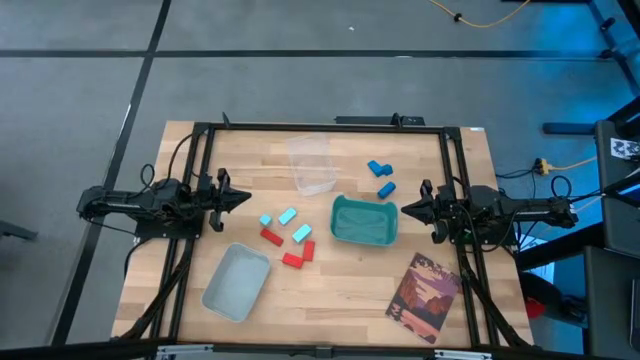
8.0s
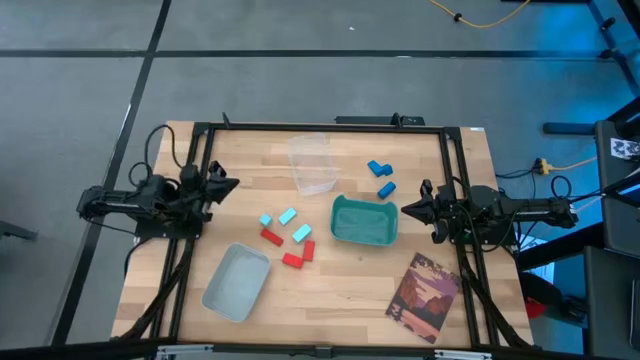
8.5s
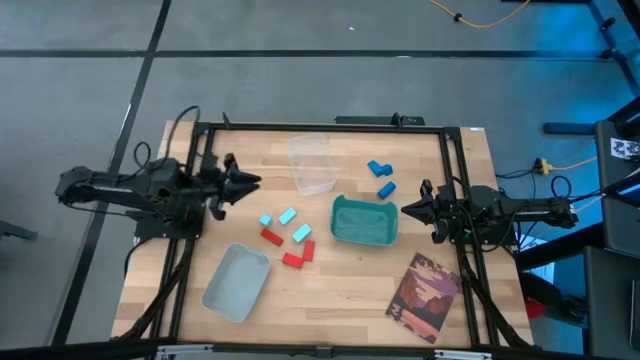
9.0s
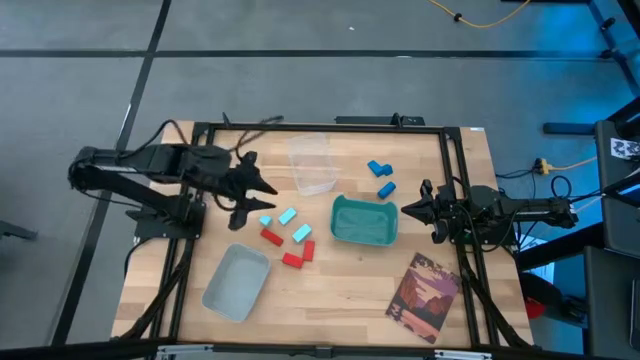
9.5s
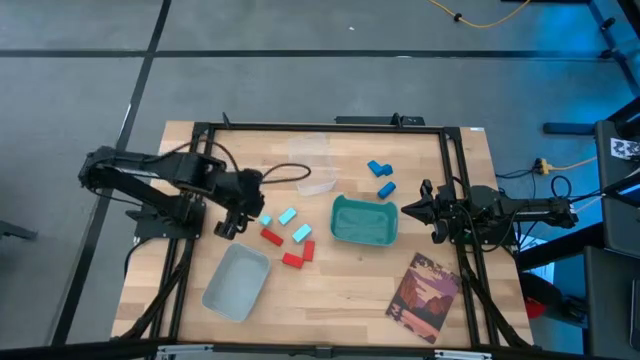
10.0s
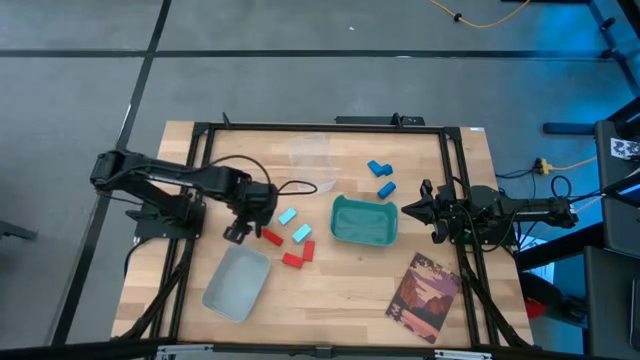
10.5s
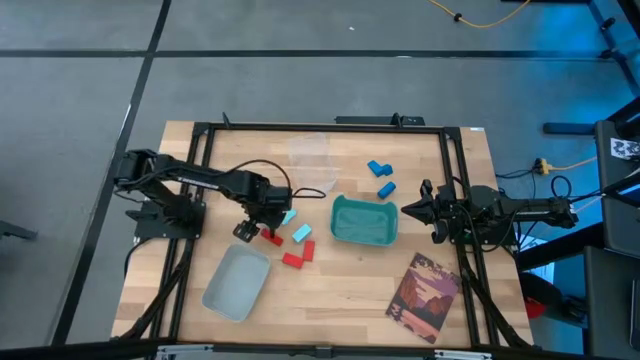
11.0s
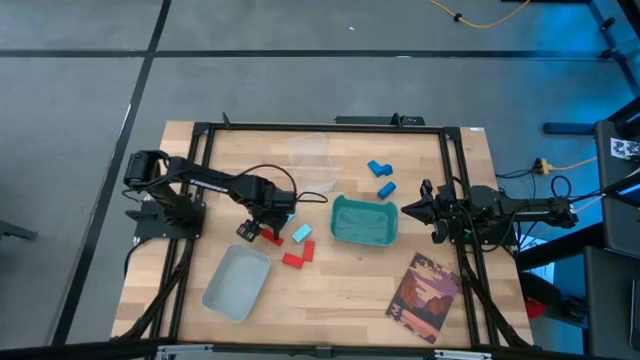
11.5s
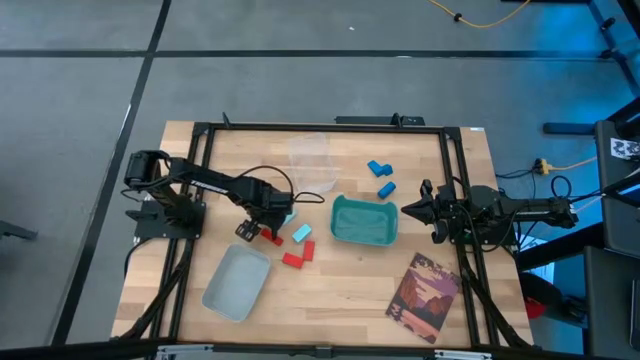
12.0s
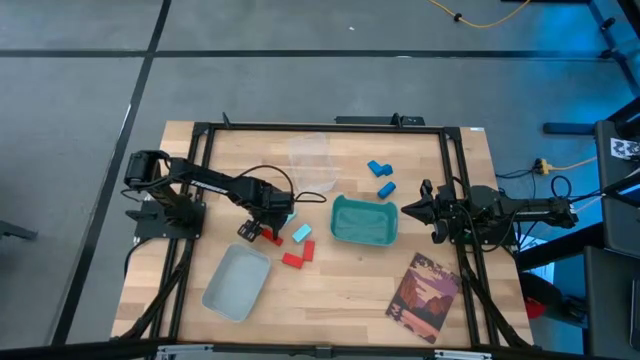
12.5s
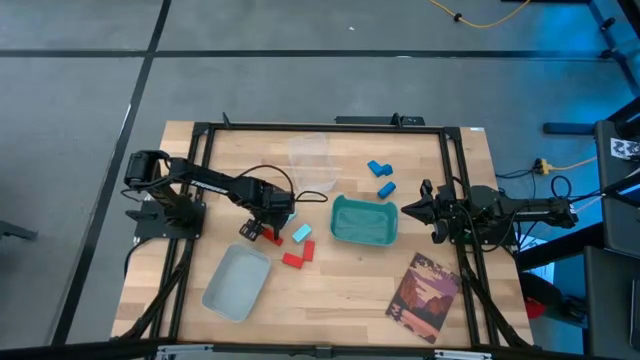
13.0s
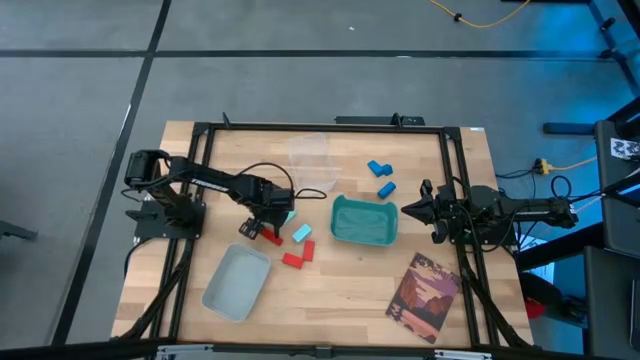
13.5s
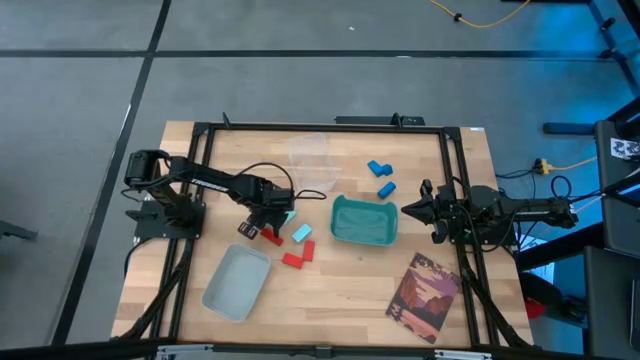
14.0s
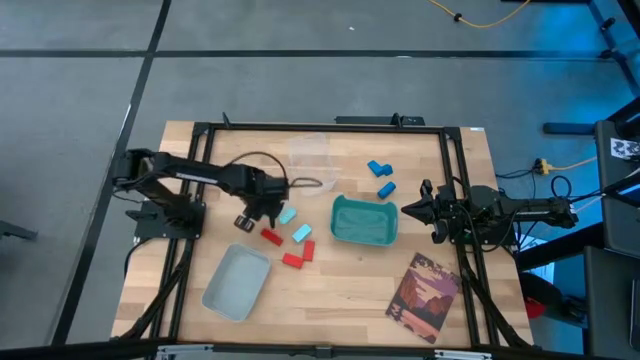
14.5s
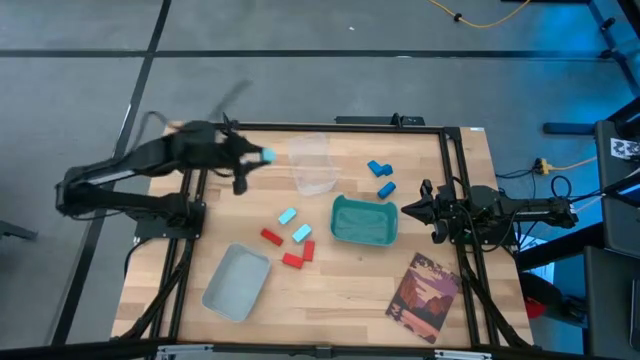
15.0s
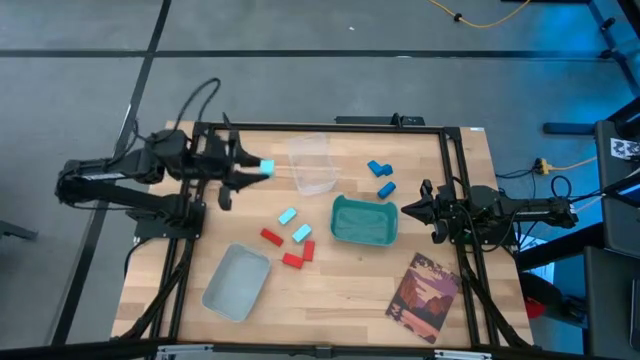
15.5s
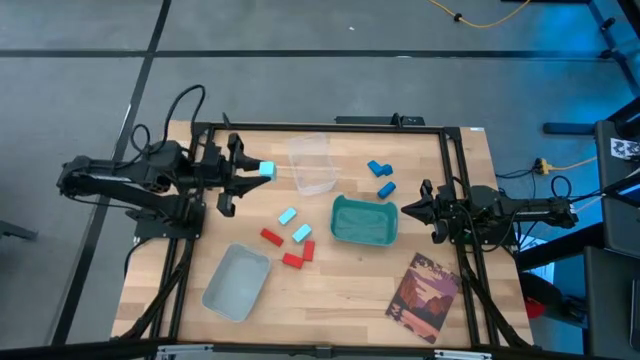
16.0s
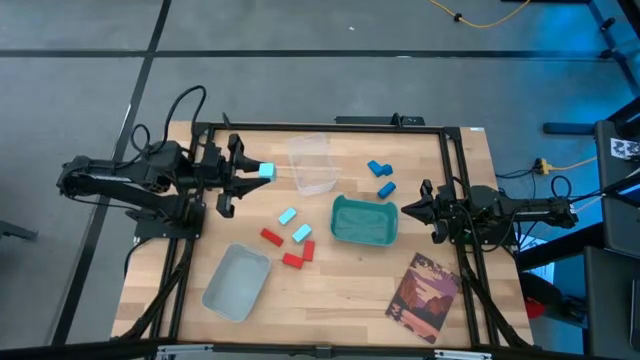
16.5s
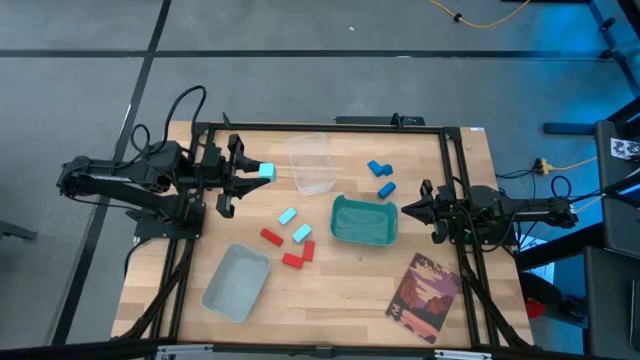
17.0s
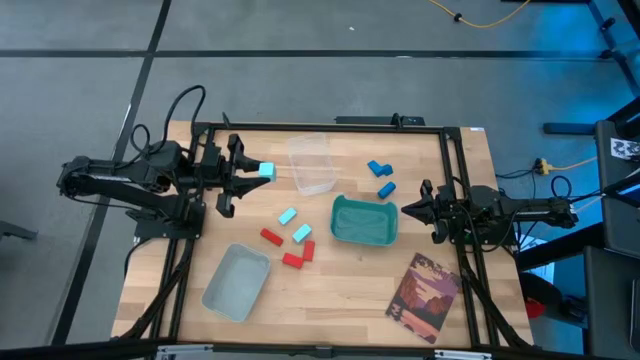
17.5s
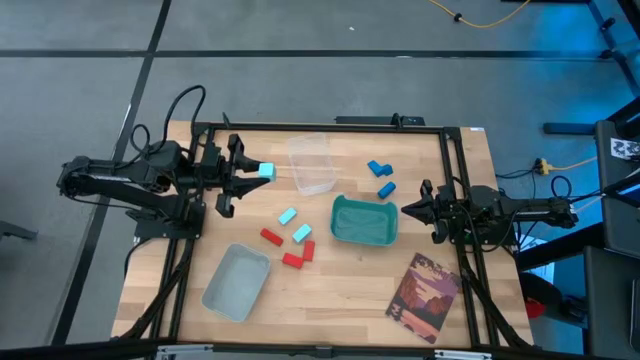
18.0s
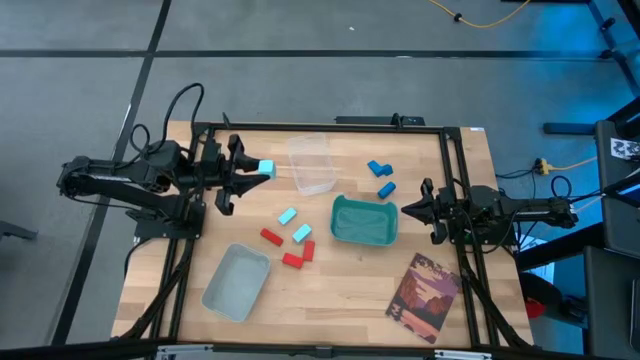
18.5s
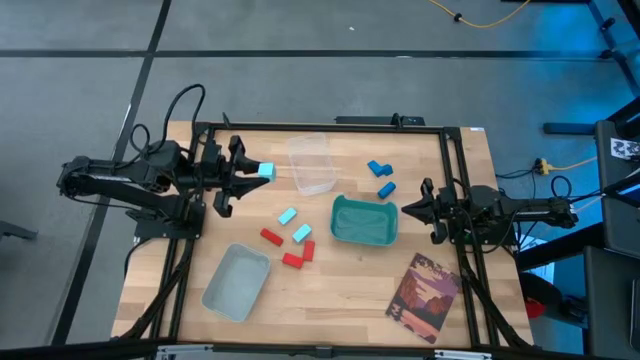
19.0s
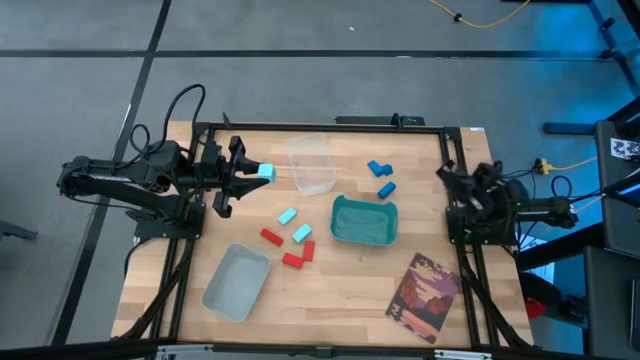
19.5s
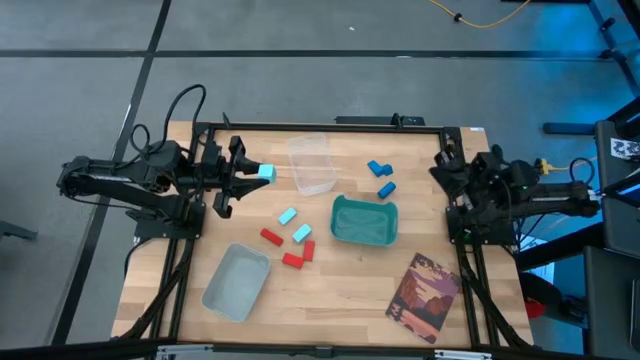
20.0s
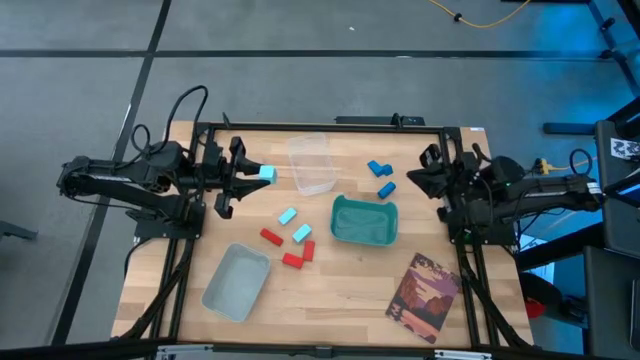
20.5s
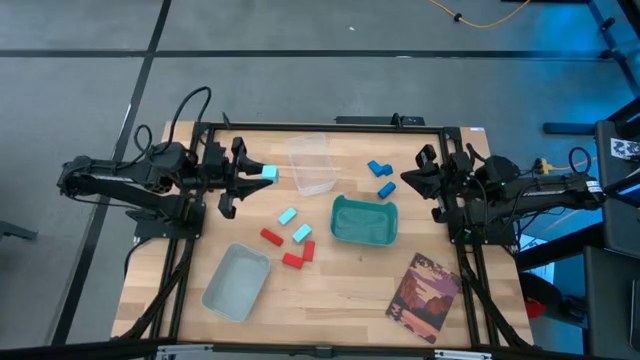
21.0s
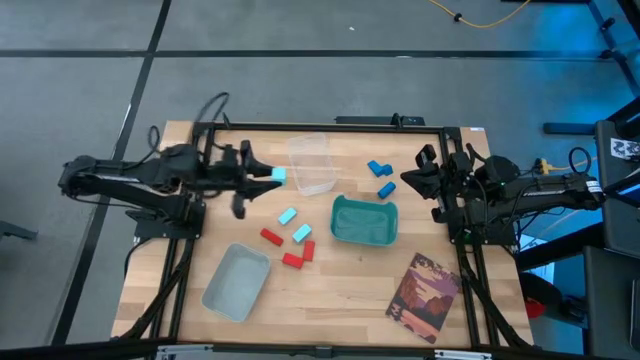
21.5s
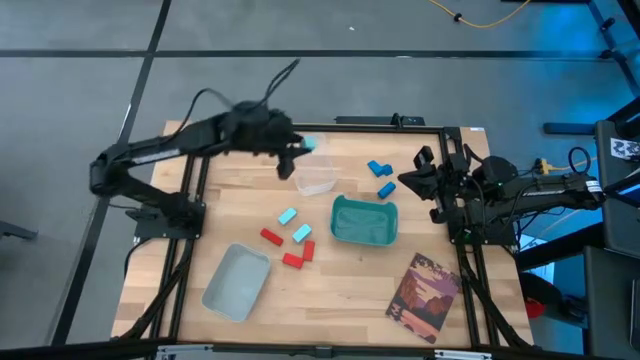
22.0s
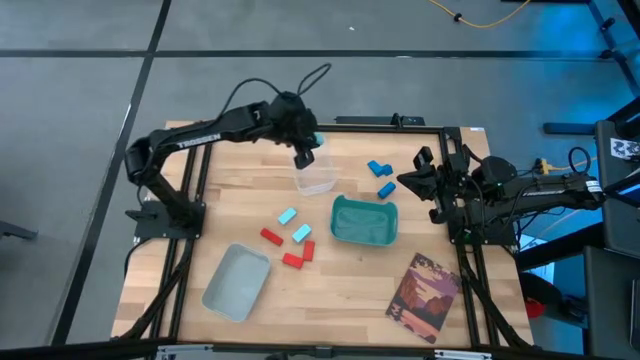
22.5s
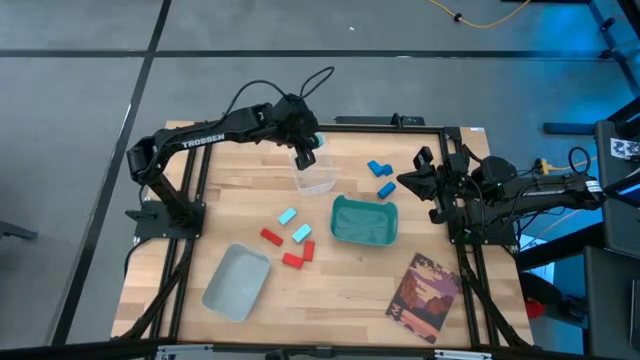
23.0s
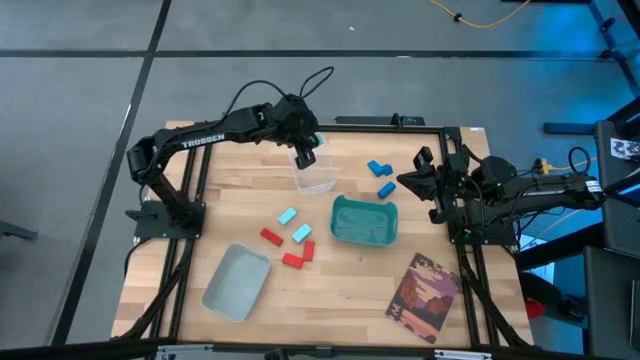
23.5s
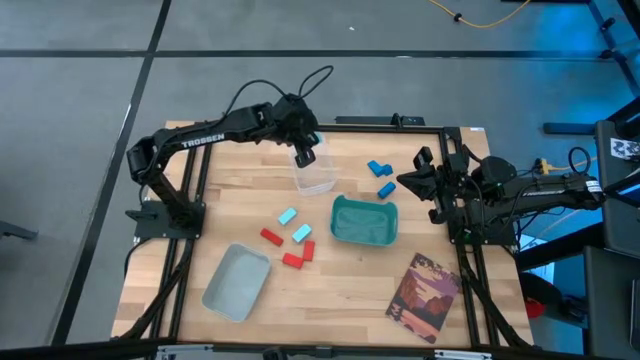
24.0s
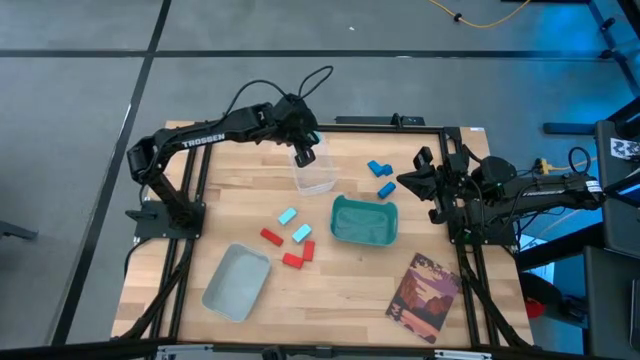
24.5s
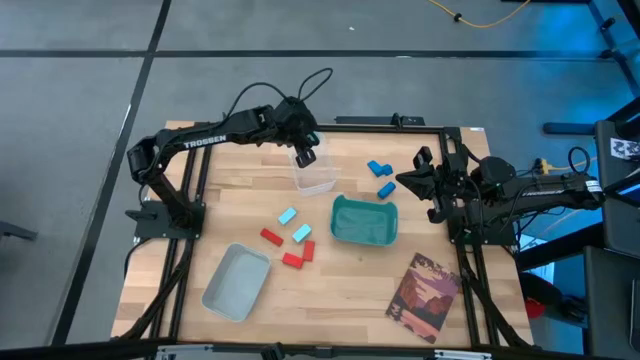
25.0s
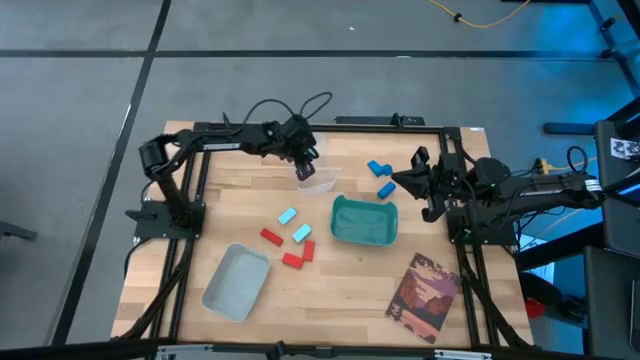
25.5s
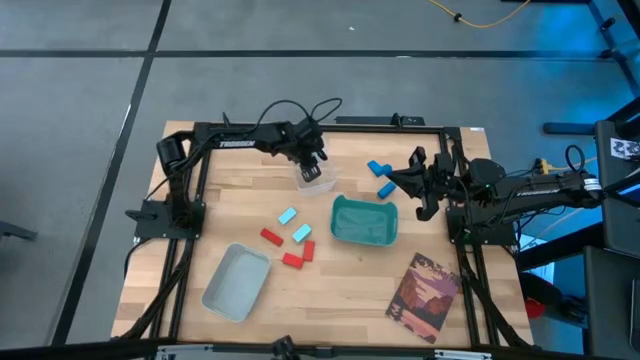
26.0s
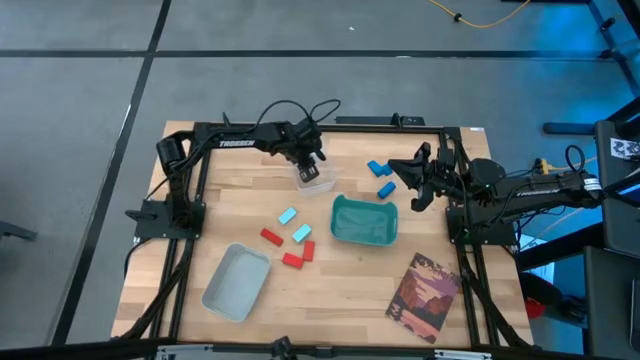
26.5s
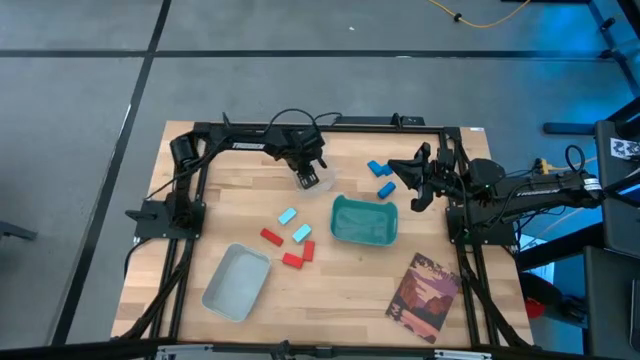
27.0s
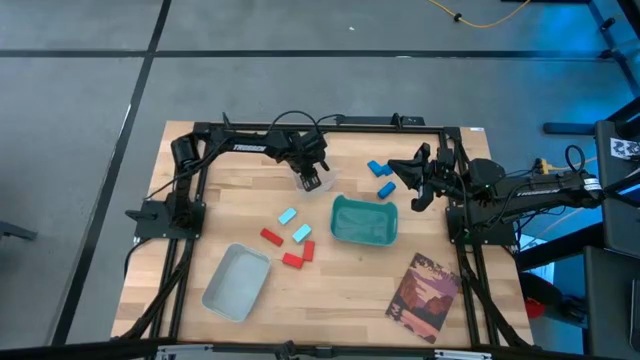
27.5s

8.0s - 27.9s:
Task: Sort & place blocks by color
Put the light blue block into the transparent bin
